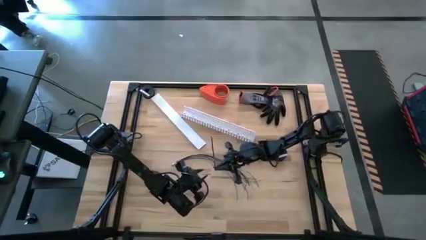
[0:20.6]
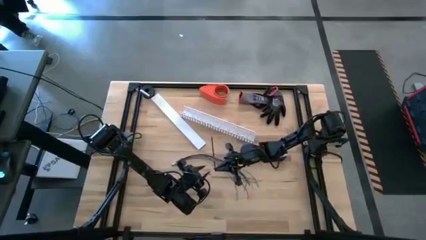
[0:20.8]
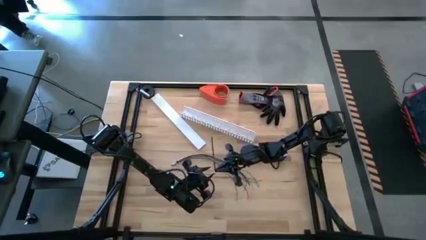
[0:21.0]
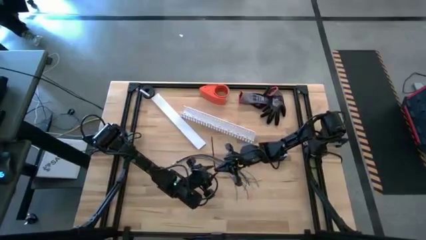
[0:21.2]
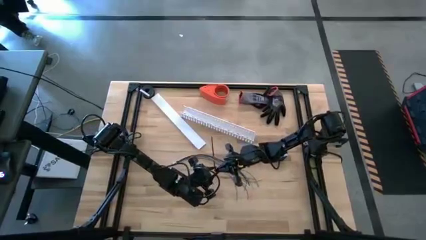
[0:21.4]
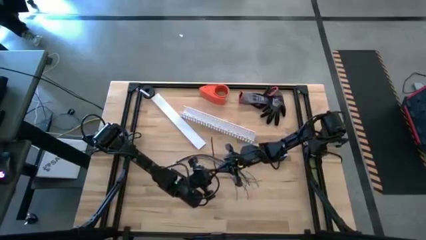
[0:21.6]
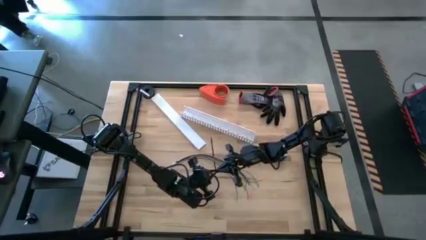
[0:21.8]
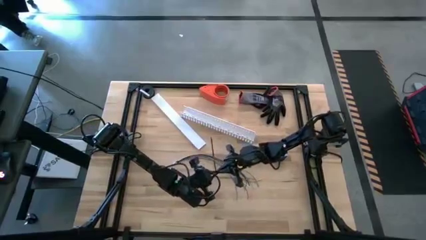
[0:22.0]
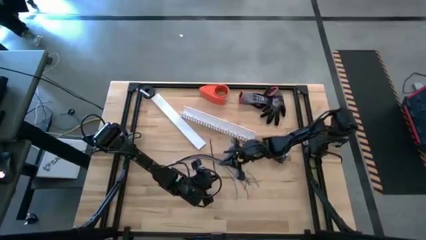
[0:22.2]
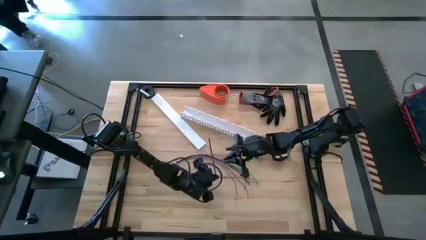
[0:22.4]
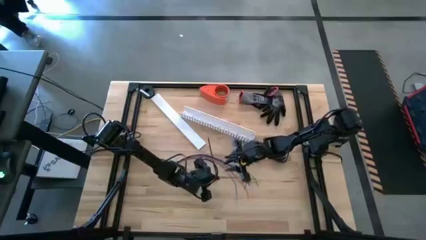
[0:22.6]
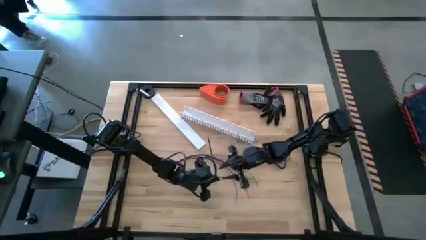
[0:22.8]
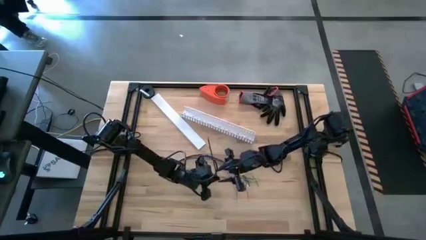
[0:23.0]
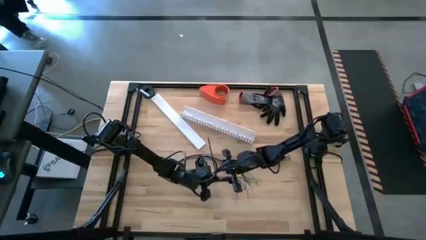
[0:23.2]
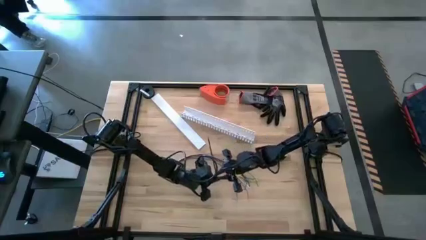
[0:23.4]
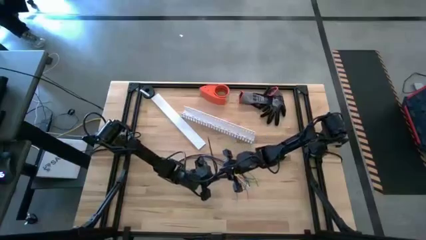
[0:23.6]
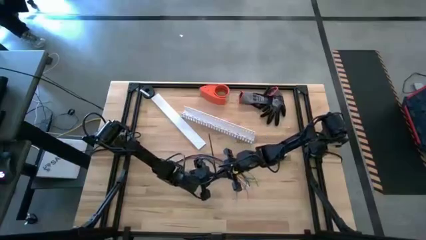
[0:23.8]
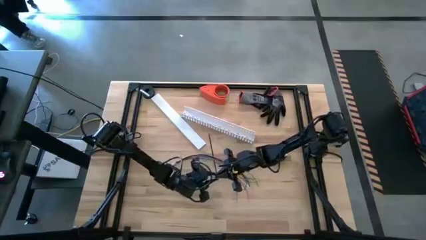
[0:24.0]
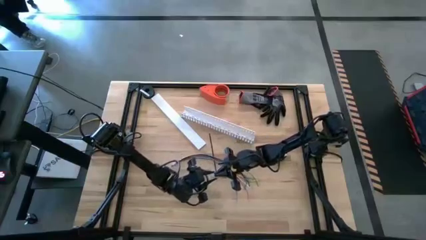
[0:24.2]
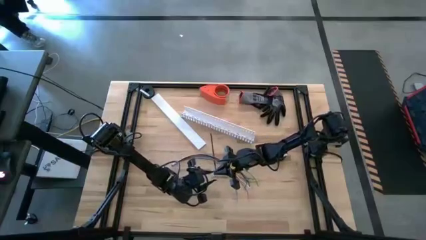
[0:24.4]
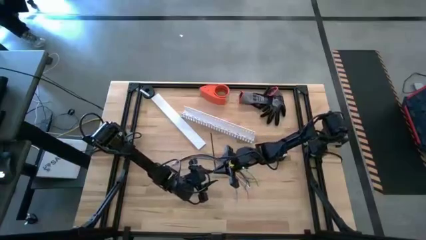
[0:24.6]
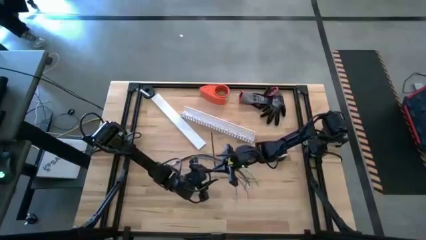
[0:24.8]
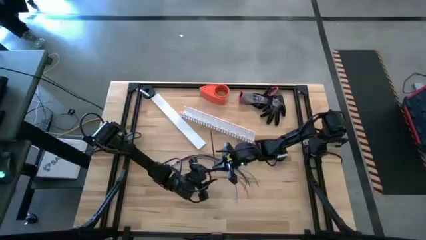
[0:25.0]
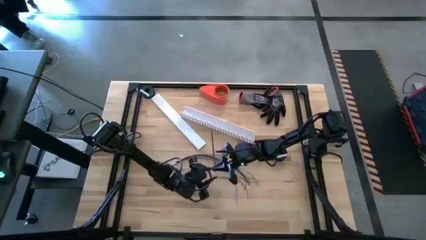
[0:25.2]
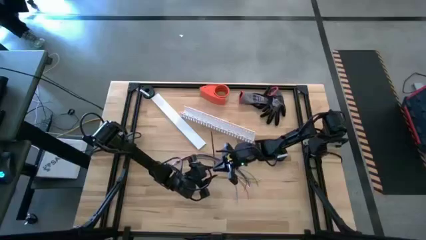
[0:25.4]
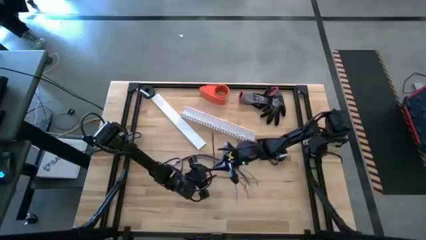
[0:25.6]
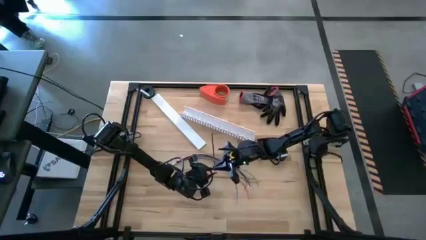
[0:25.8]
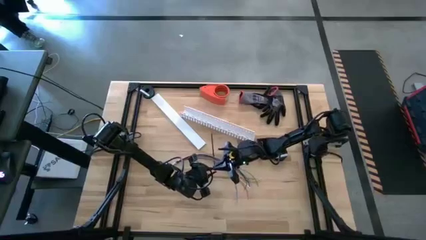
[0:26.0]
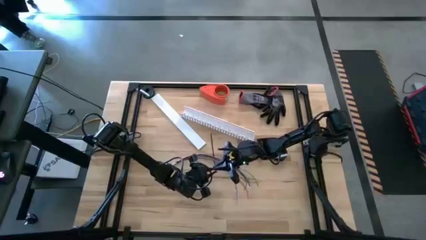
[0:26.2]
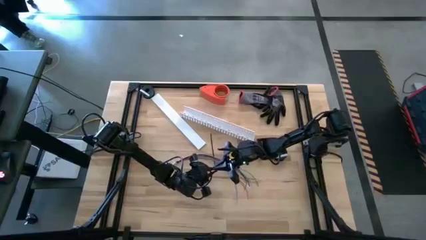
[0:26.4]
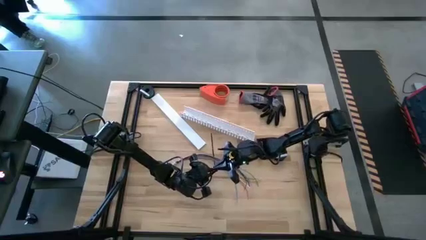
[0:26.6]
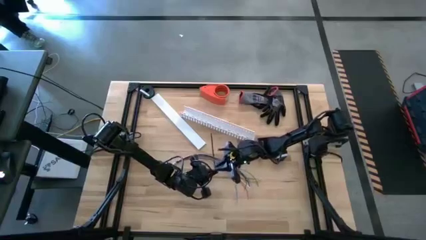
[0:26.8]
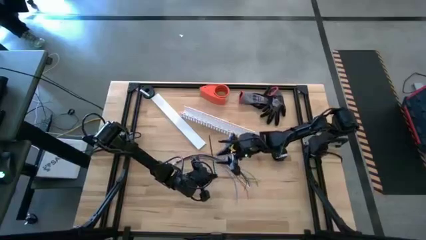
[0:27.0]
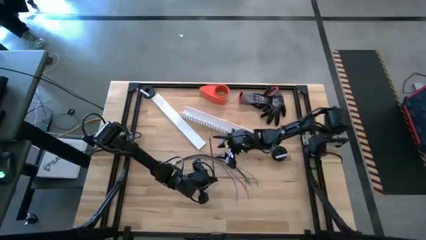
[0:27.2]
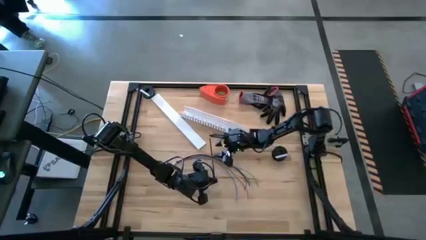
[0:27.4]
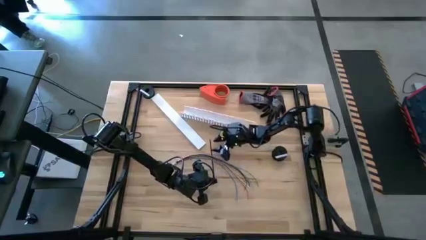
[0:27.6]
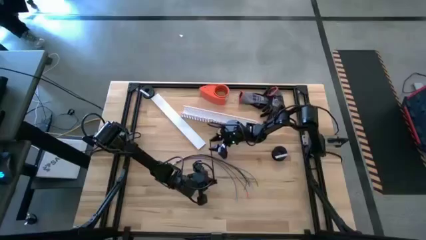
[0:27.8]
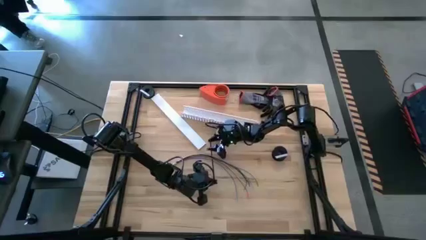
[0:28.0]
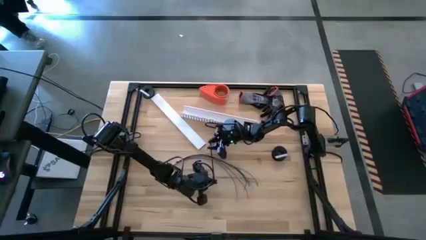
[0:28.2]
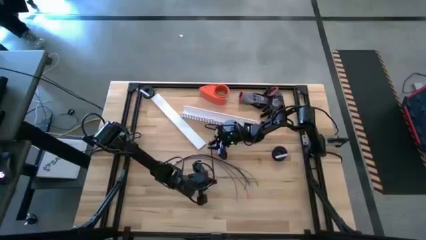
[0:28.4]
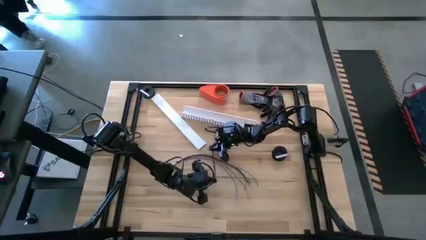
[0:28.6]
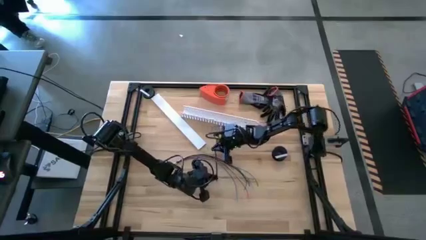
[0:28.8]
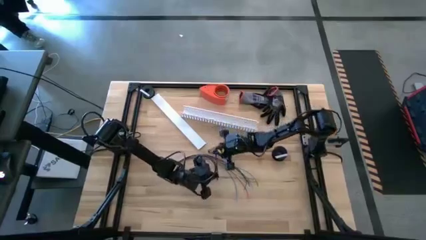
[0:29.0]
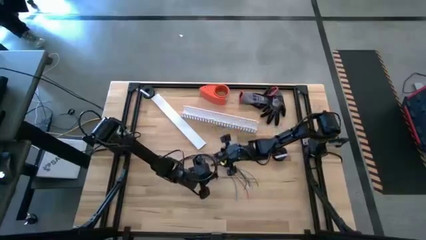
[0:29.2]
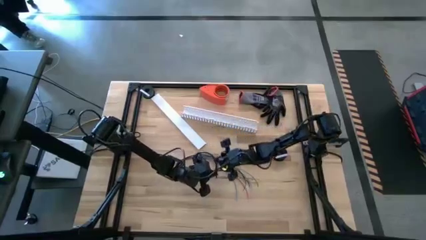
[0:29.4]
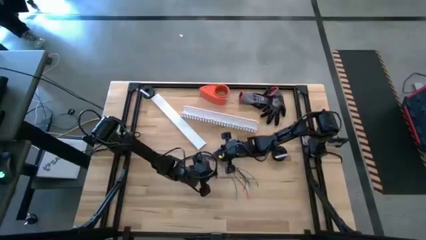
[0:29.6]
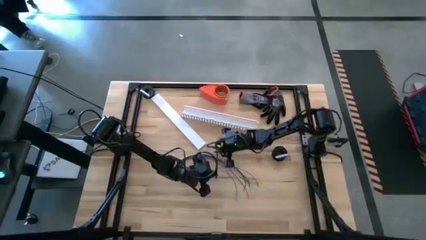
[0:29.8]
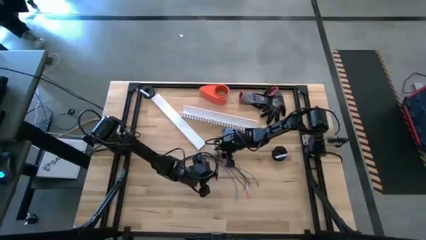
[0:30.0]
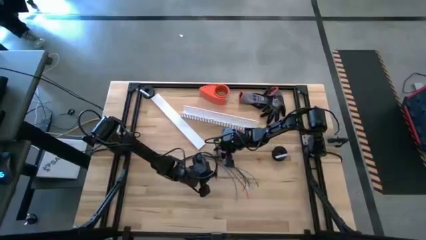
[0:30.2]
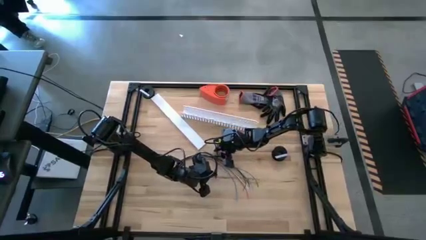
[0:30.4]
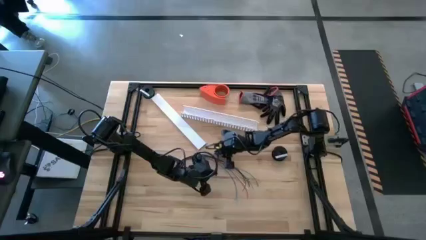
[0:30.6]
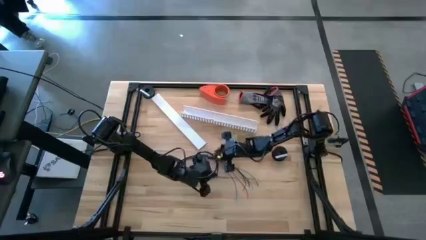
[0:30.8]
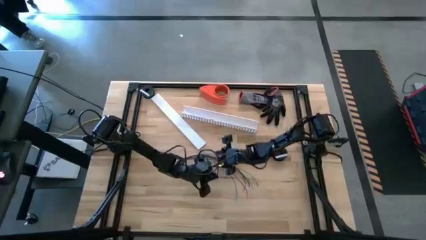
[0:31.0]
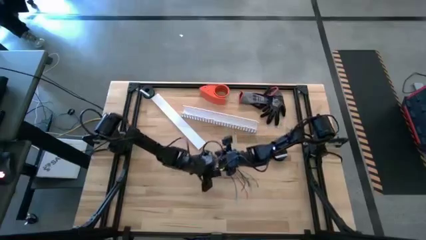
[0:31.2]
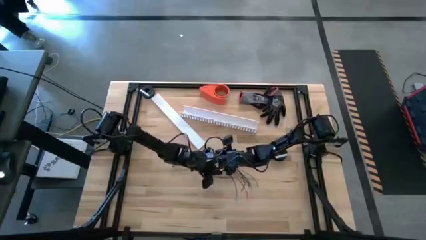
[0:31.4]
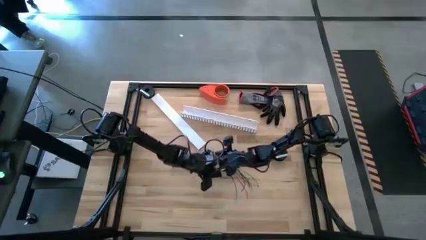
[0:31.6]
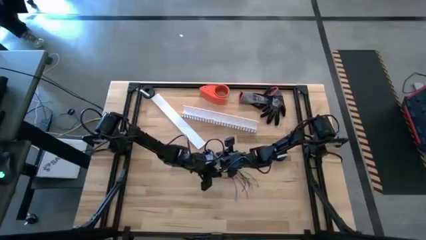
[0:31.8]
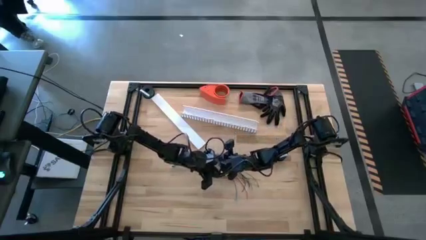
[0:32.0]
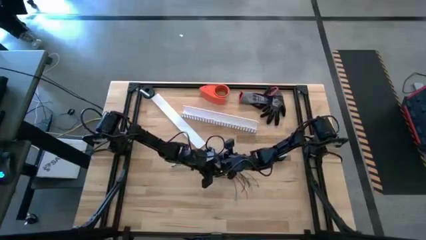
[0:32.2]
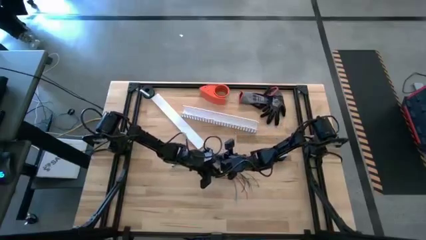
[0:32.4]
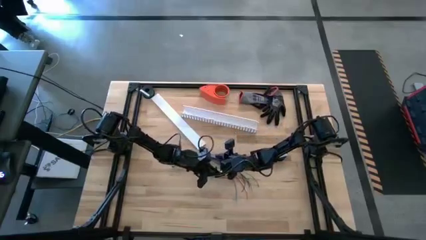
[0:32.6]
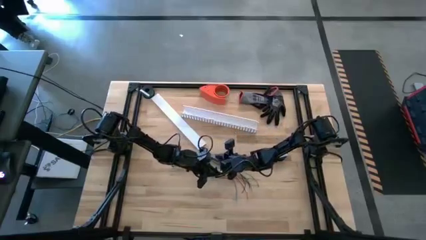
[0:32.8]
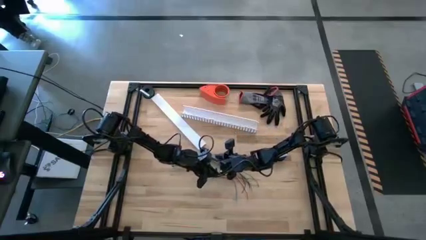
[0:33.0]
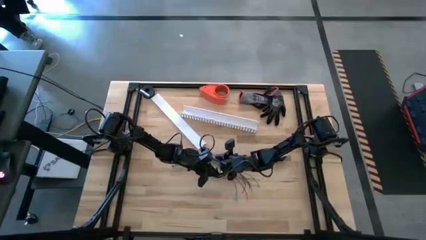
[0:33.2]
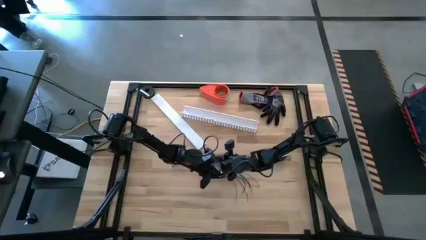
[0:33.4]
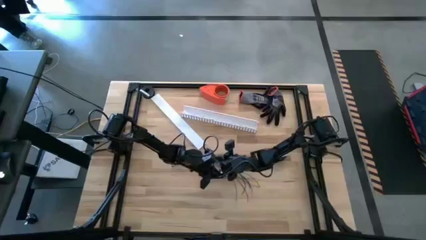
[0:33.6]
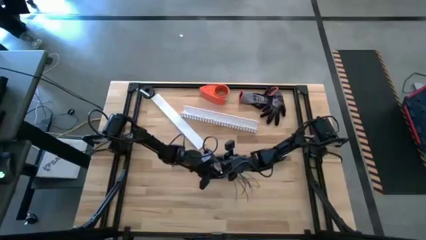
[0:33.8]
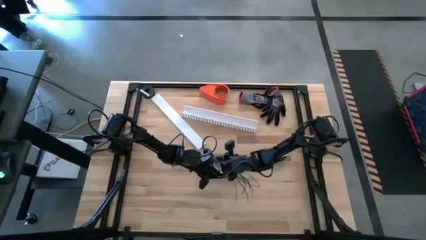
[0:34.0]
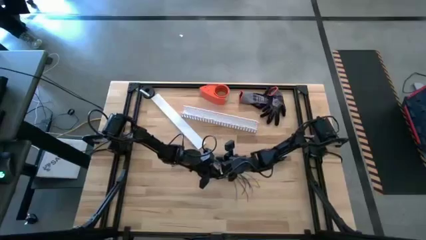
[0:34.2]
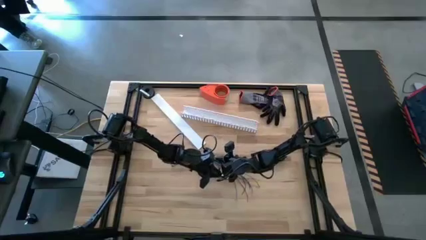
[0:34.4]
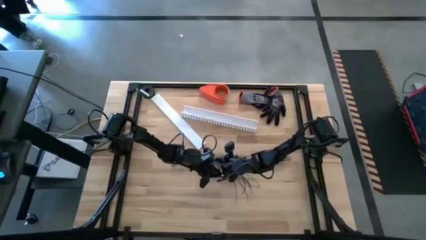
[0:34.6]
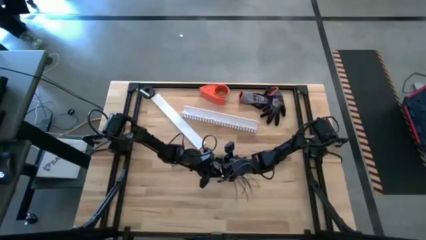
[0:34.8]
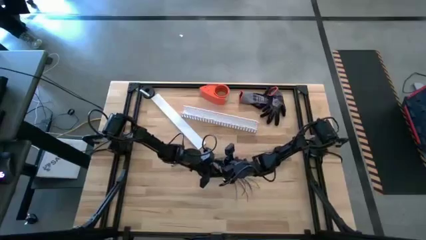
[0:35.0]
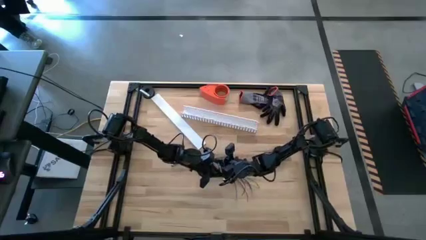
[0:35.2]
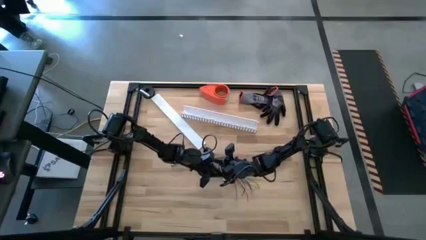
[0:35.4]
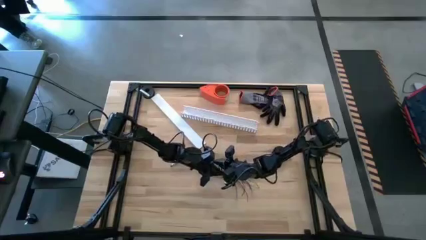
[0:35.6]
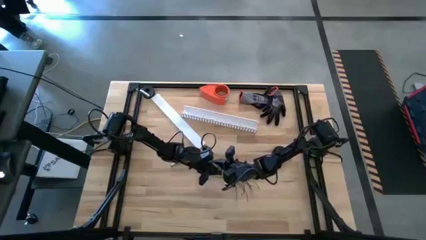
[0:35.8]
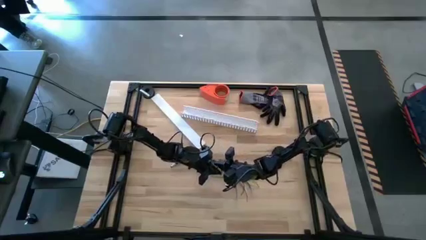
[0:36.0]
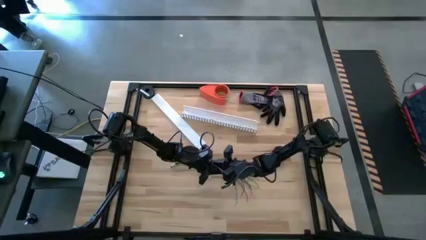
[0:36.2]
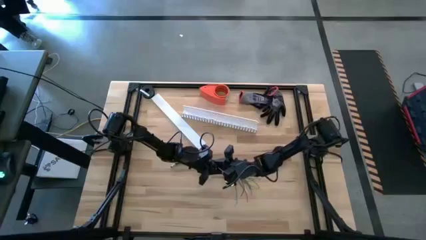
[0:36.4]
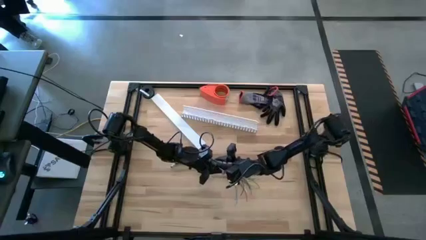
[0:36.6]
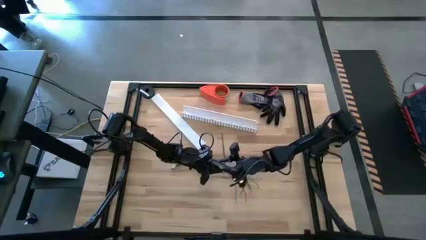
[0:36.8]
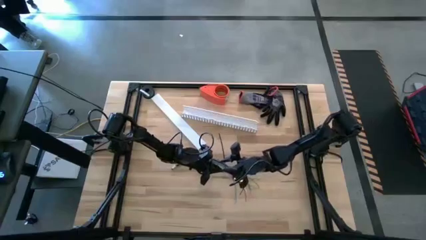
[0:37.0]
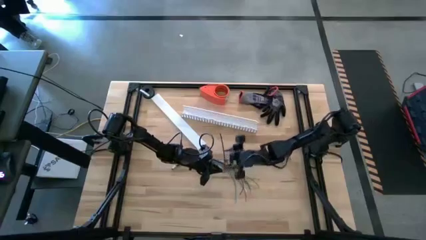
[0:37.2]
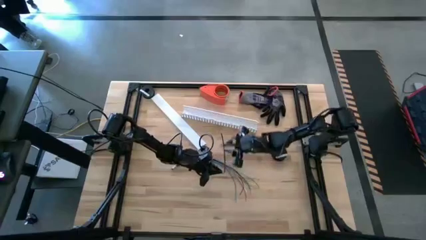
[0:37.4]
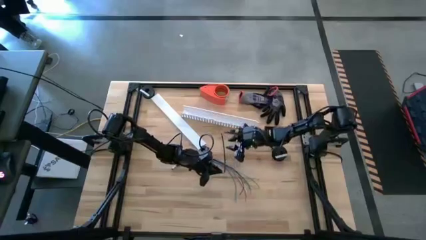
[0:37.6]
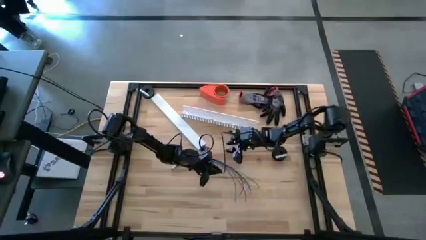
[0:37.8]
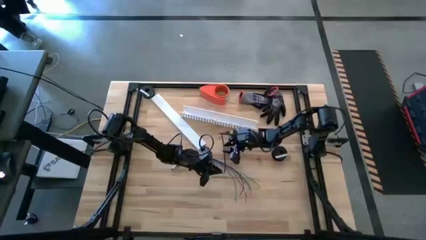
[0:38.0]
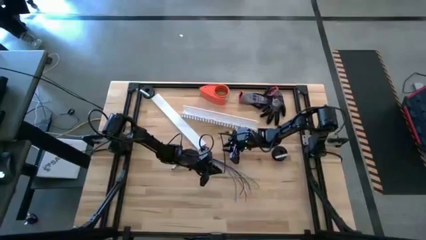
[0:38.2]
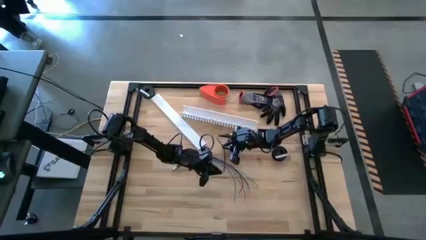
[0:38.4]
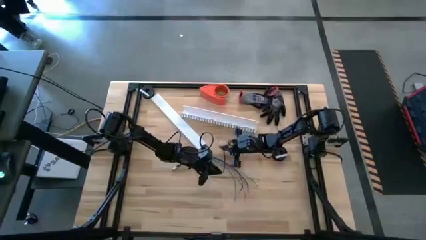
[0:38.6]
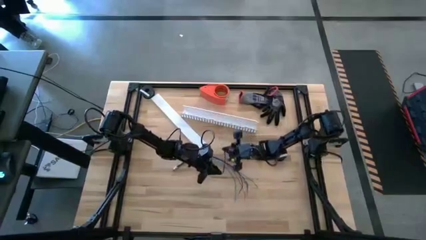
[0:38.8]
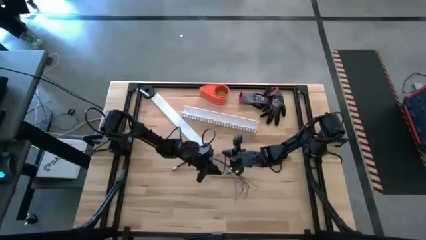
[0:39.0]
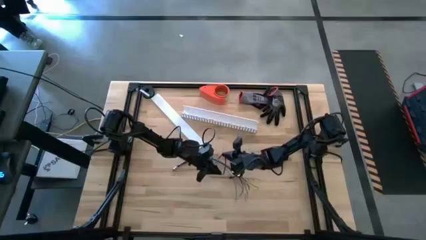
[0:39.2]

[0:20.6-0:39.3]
Task: Ziptie cables
Wrap the cable wires with the black zip tie
